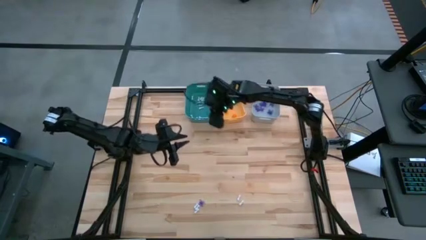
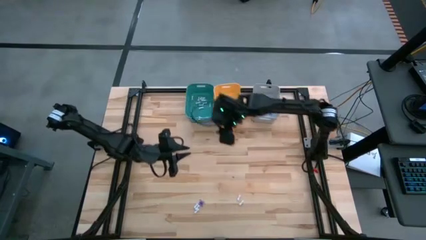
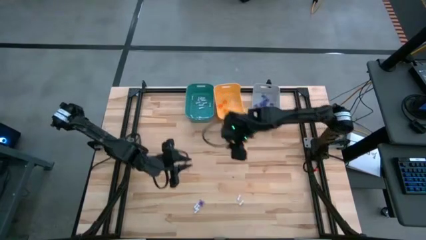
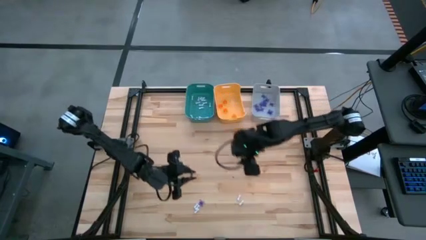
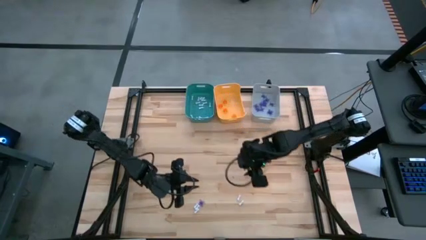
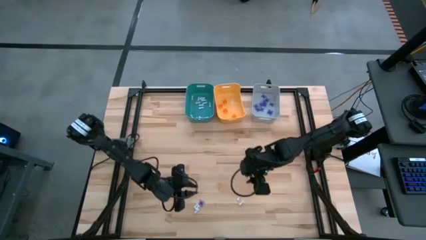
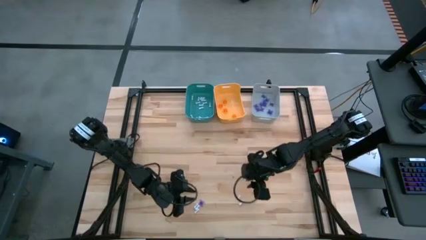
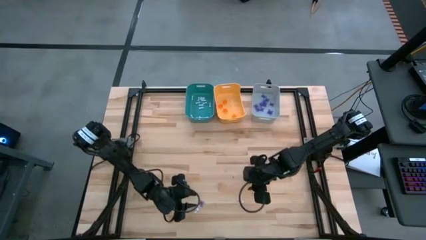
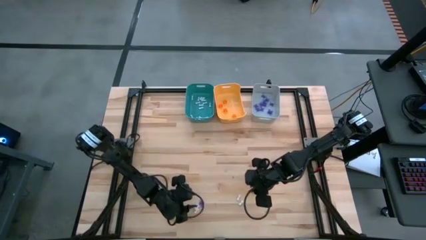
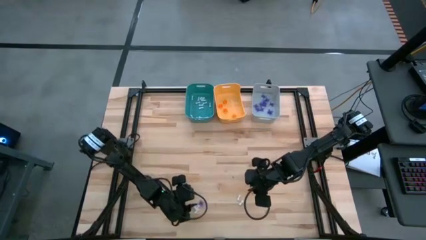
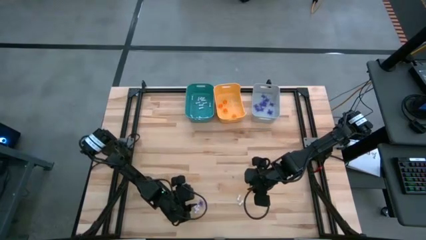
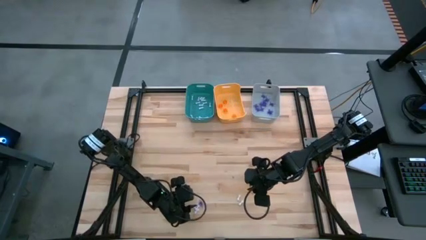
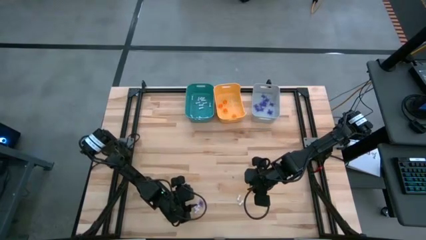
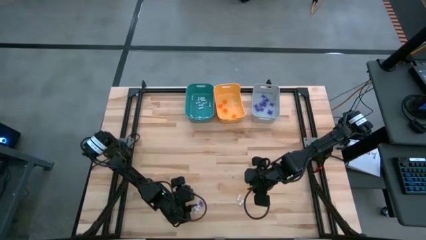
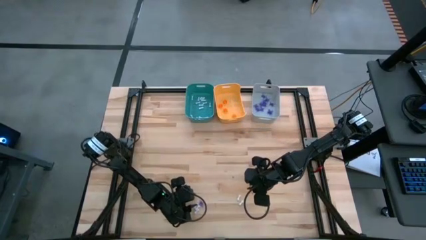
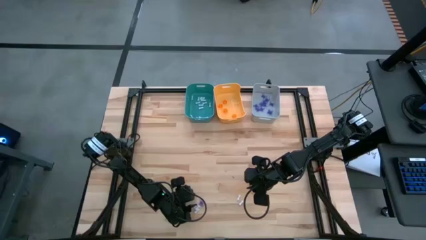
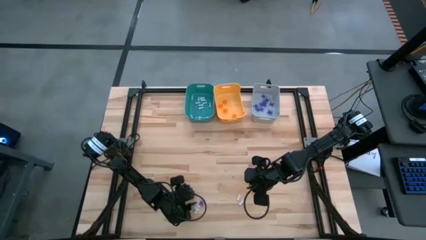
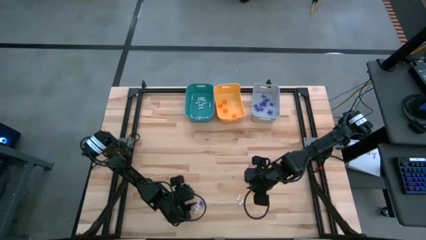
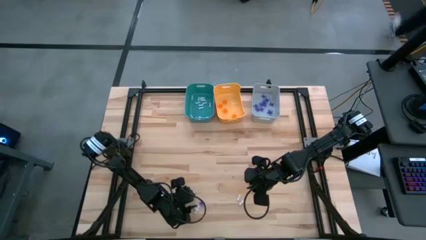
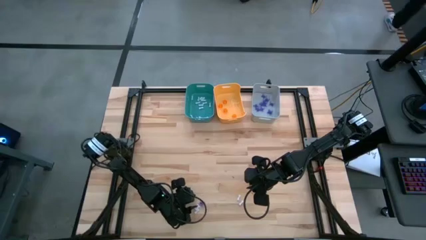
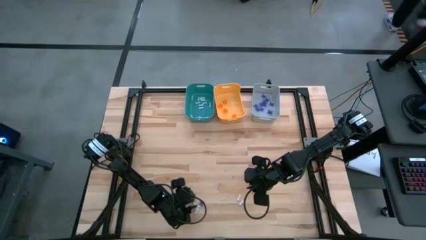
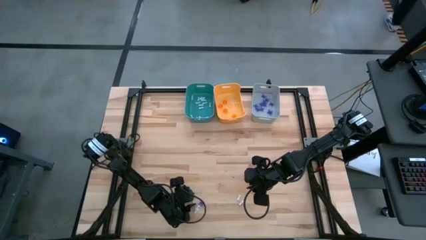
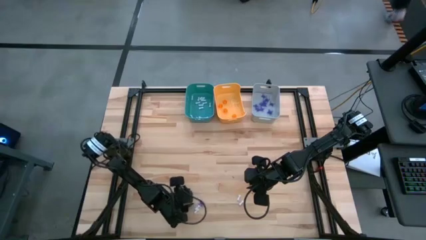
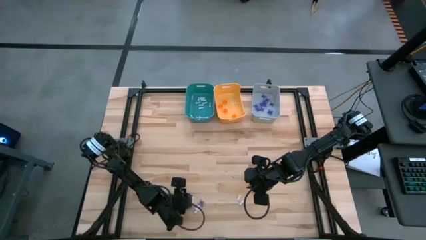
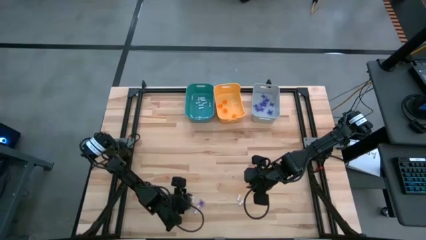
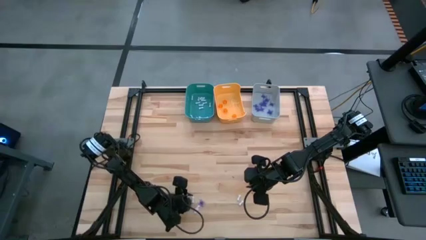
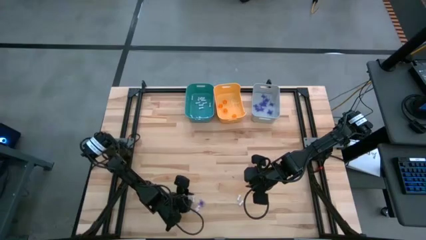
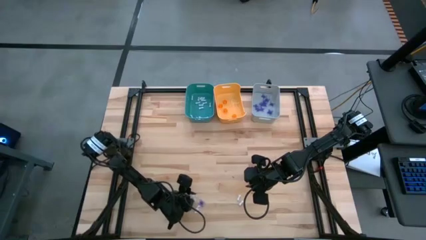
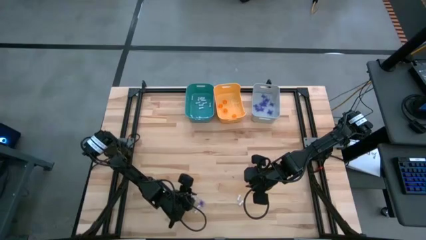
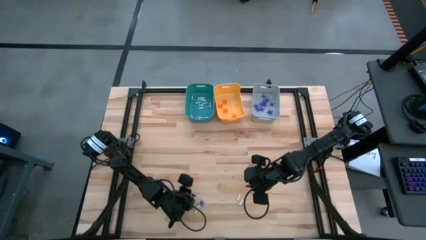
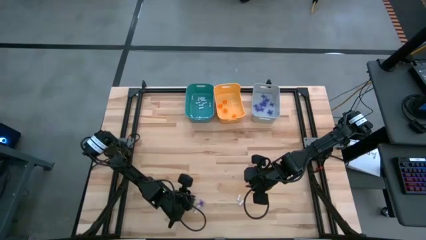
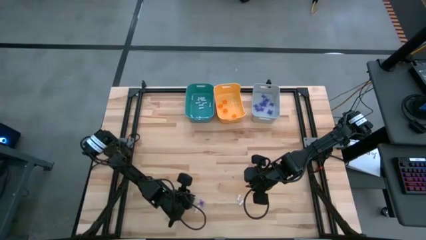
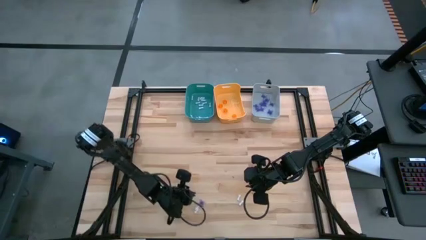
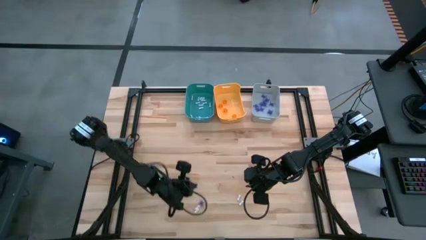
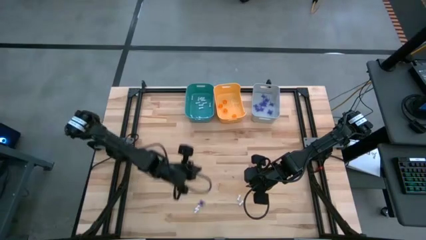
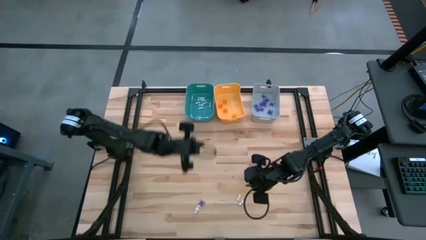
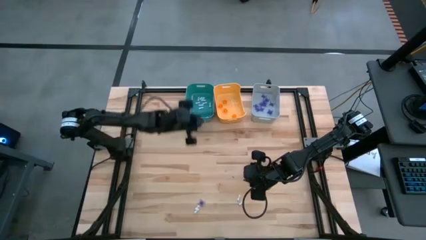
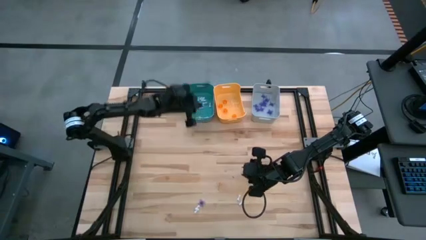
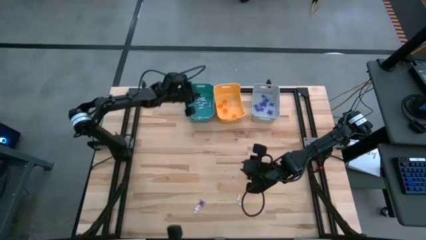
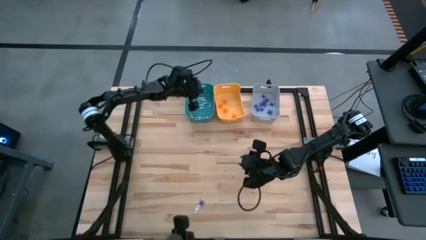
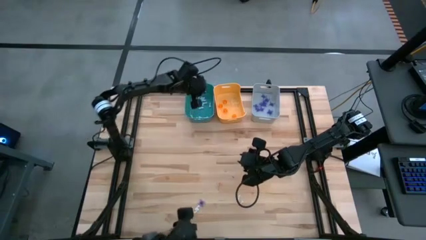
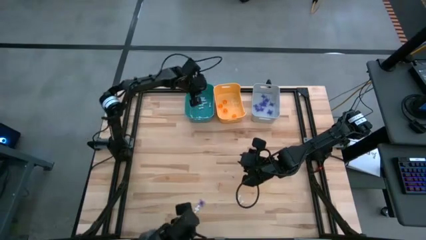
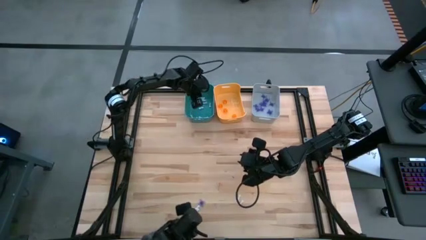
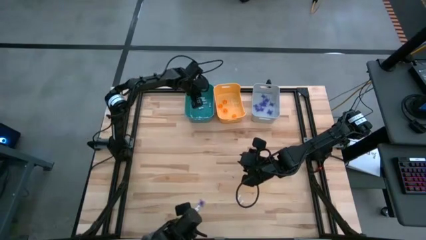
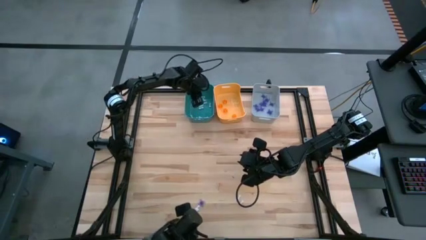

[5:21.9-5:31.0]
Task: Sort Halloween decoration
Put the white bone toy into the blue bin

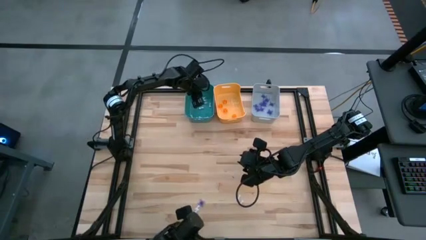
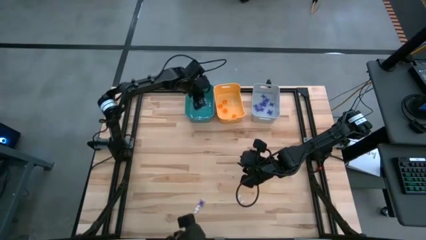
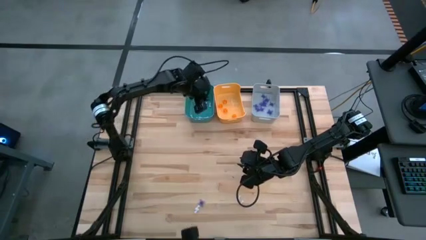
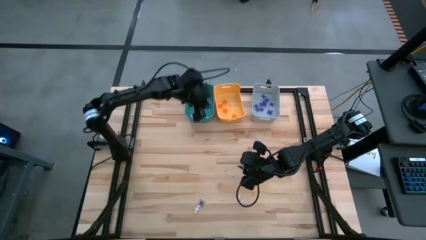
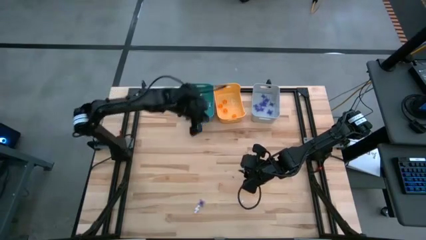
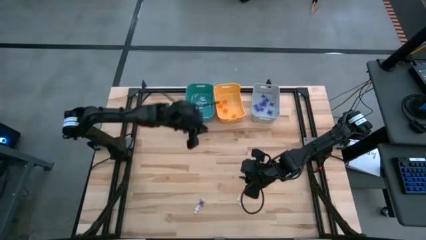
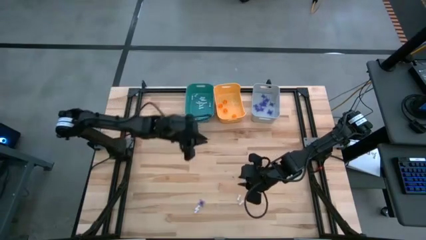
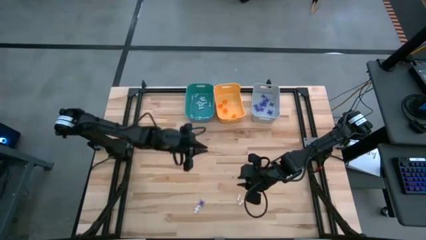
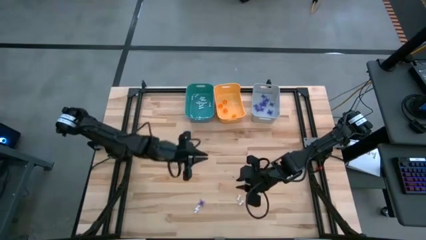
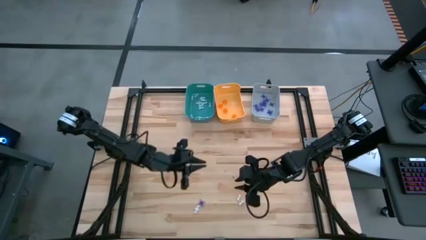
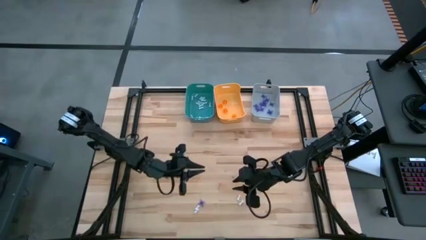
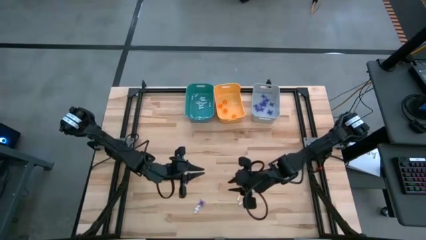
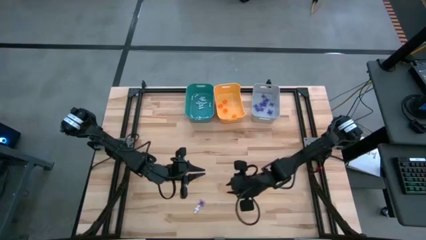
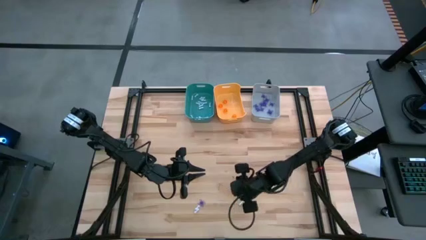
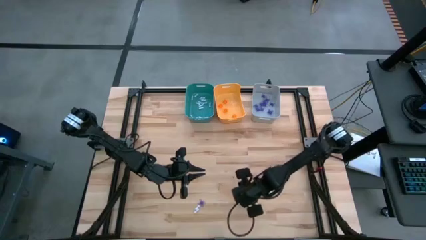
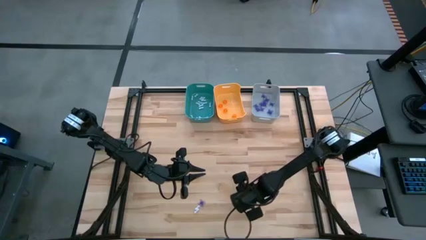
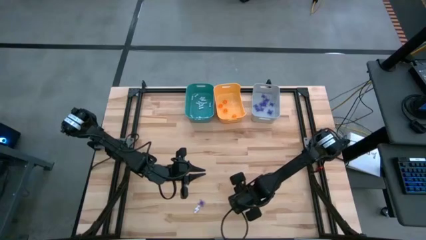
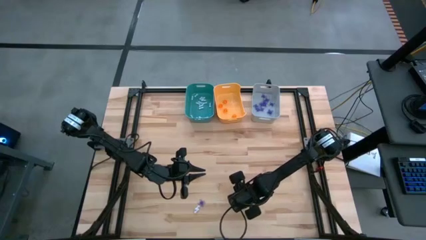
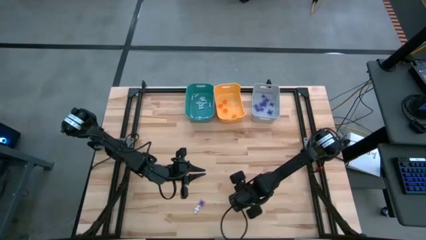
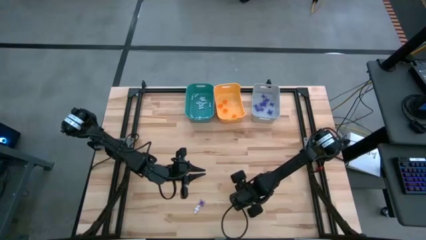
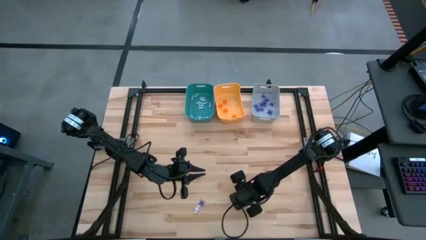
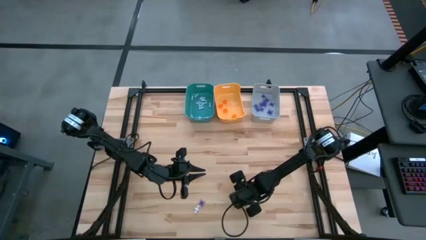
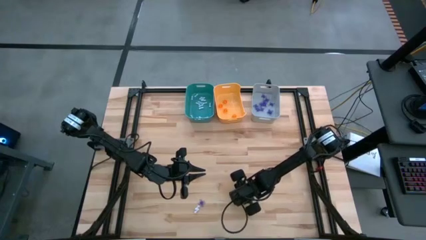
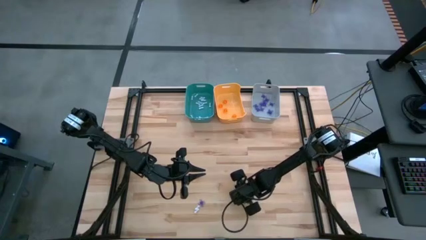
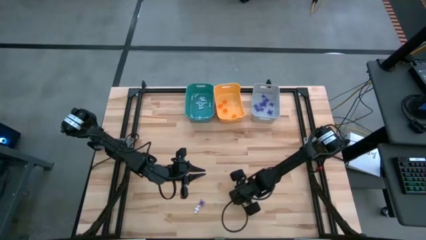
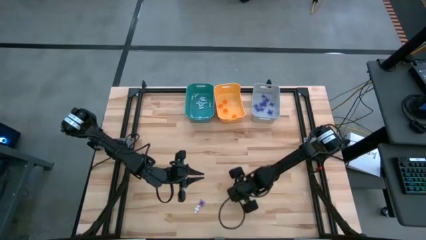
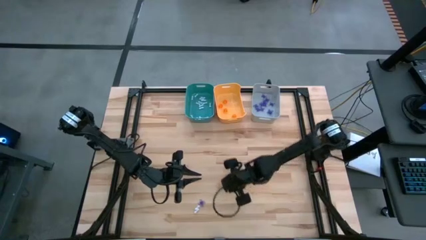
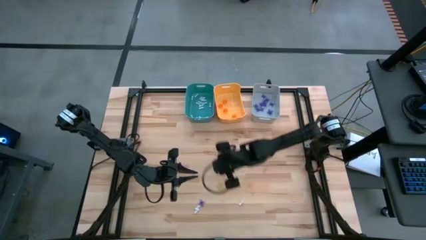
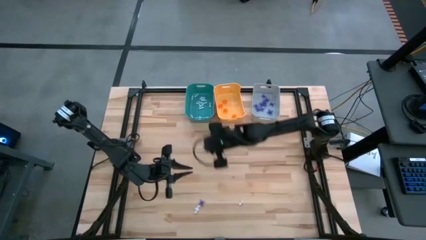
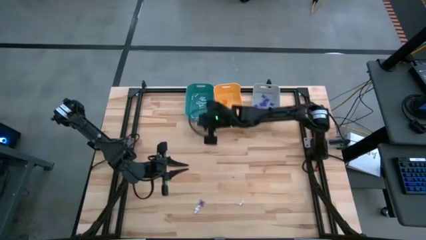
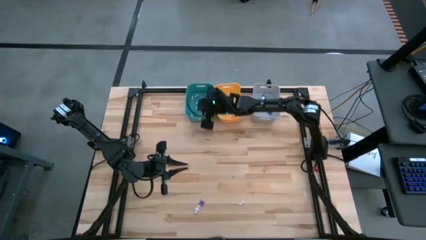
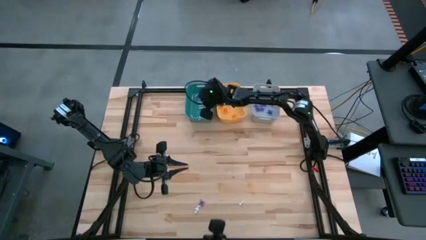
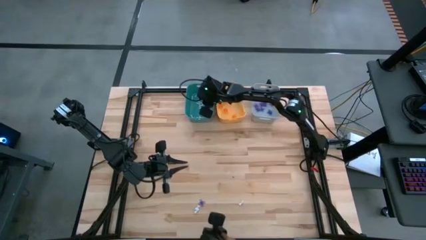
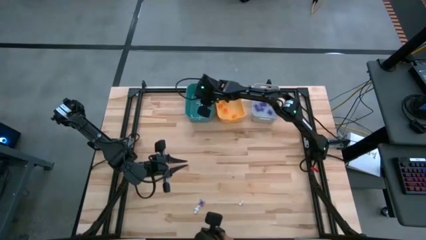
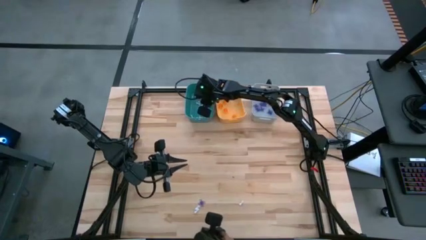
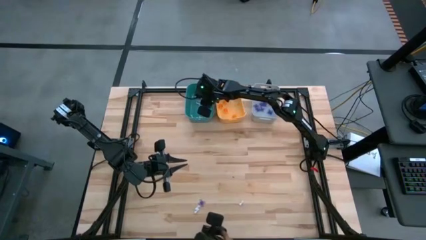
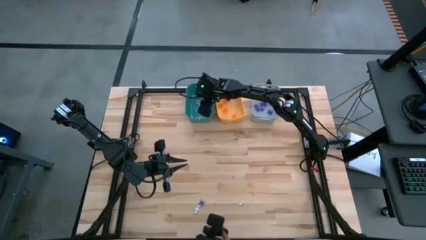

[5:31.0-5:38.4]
Put the white bone toy into the blue bin
